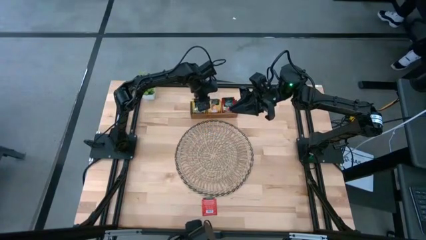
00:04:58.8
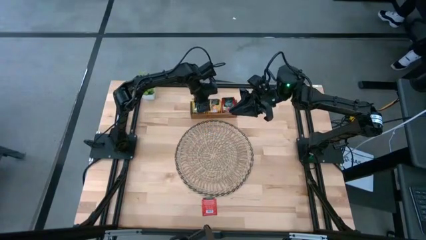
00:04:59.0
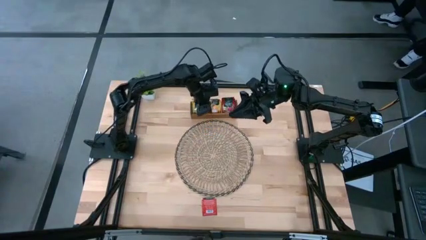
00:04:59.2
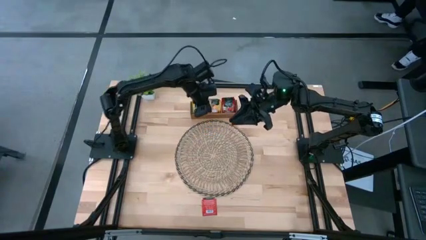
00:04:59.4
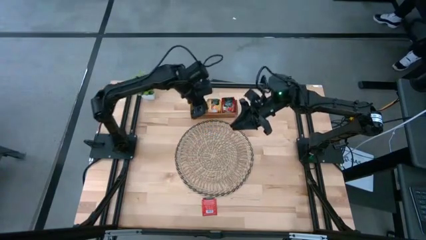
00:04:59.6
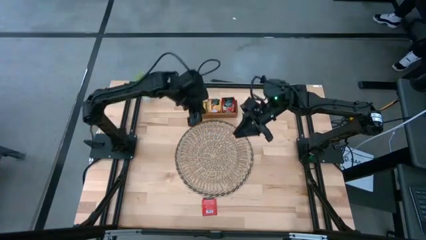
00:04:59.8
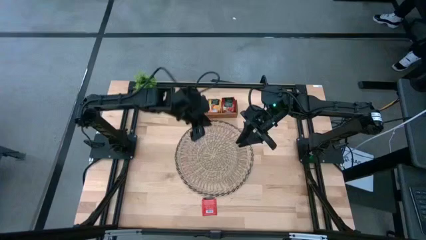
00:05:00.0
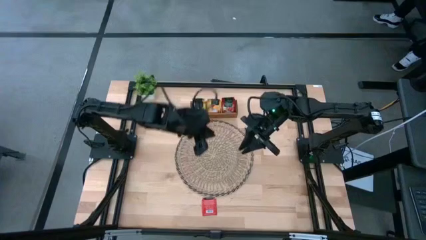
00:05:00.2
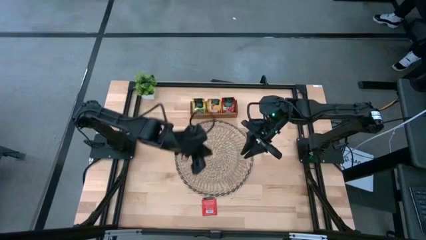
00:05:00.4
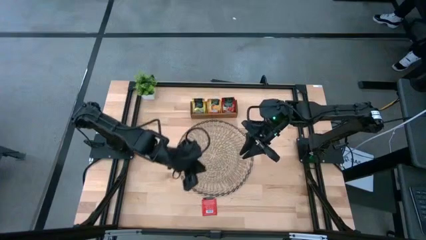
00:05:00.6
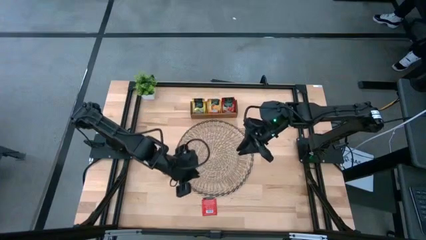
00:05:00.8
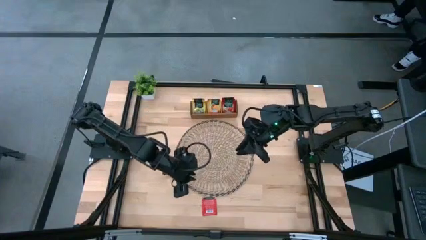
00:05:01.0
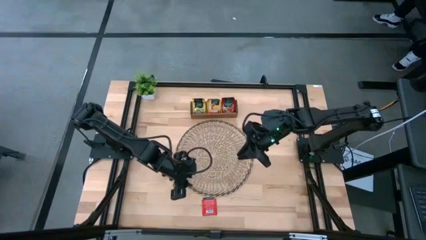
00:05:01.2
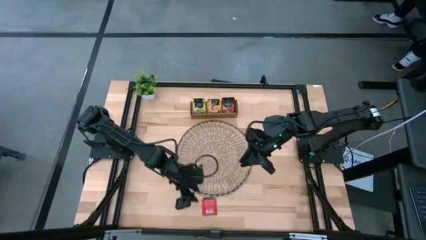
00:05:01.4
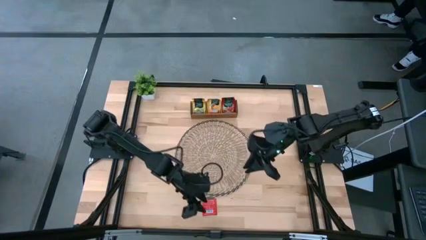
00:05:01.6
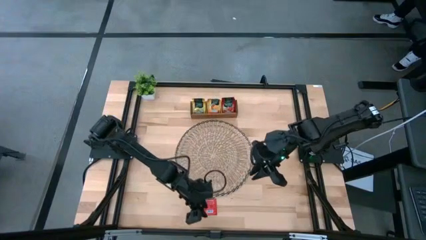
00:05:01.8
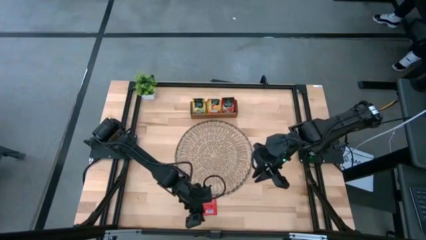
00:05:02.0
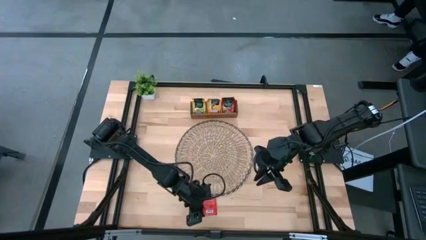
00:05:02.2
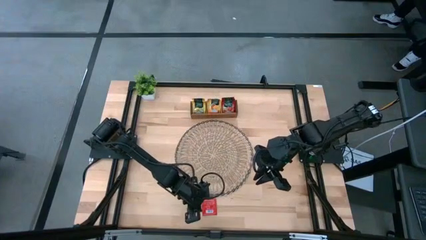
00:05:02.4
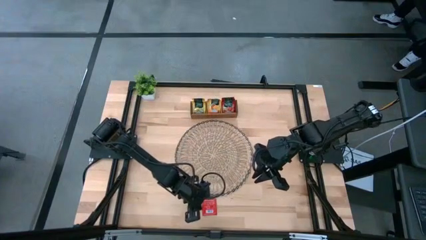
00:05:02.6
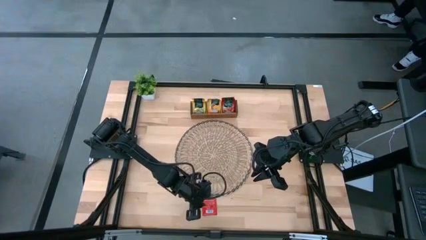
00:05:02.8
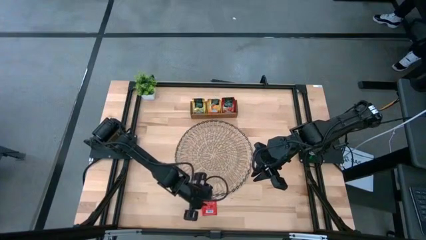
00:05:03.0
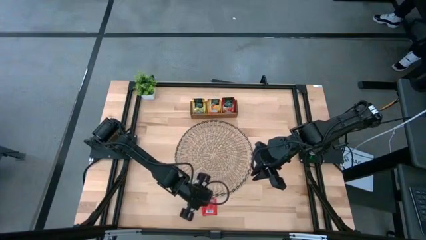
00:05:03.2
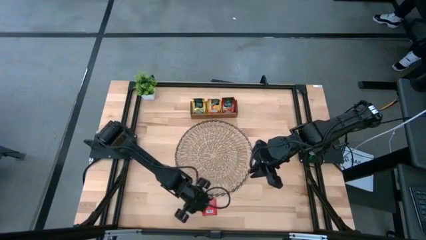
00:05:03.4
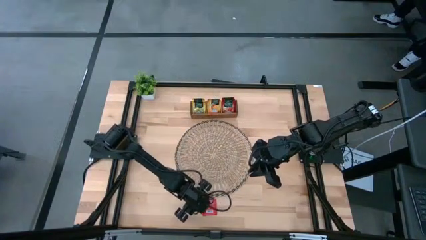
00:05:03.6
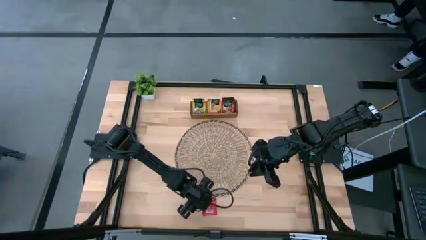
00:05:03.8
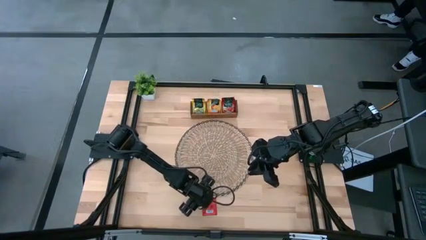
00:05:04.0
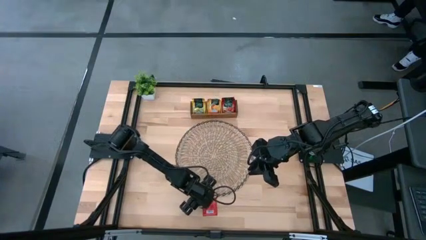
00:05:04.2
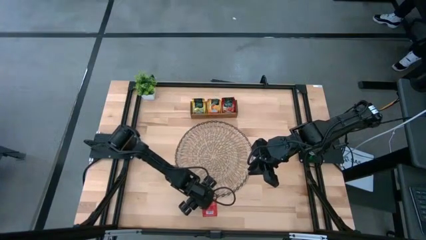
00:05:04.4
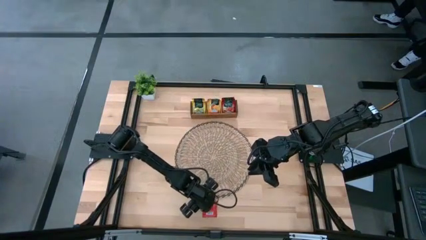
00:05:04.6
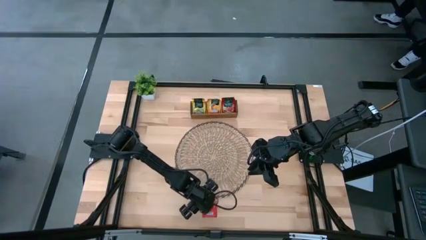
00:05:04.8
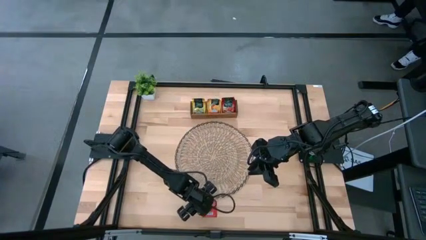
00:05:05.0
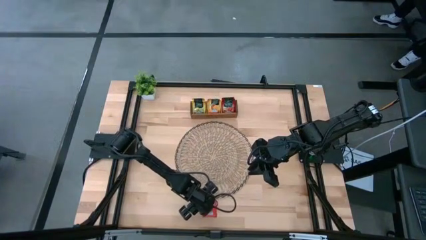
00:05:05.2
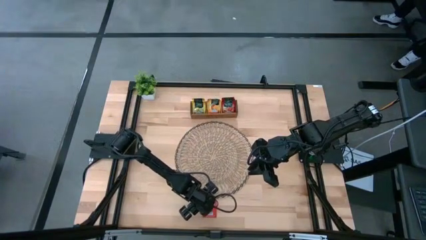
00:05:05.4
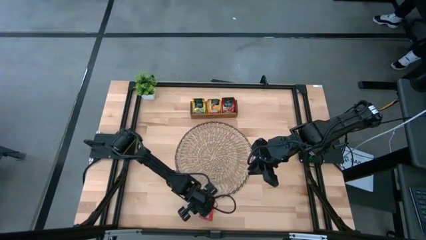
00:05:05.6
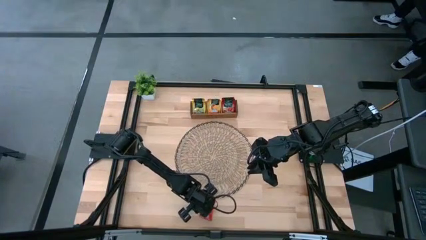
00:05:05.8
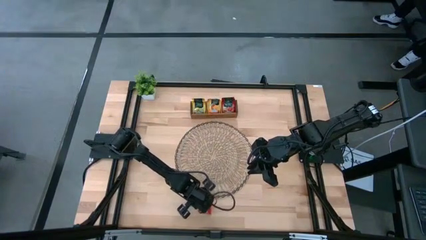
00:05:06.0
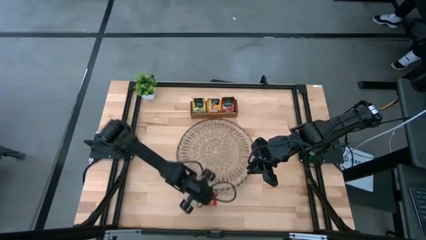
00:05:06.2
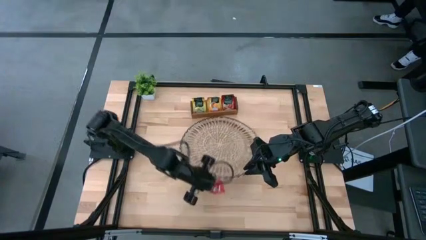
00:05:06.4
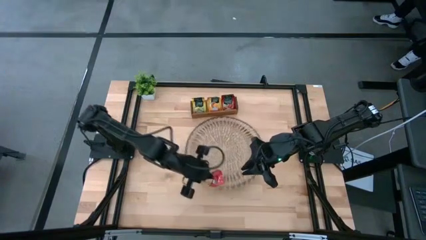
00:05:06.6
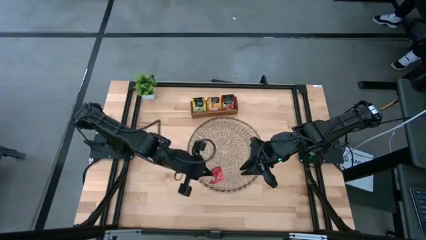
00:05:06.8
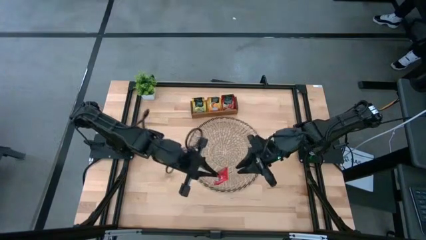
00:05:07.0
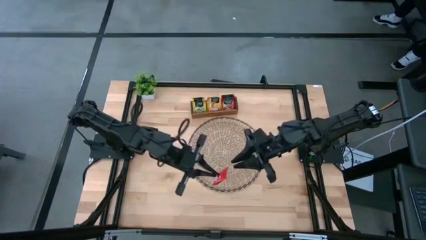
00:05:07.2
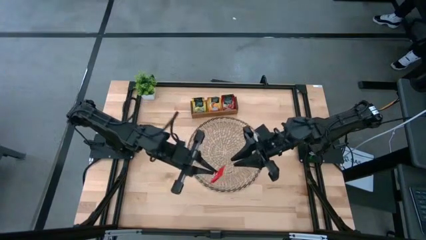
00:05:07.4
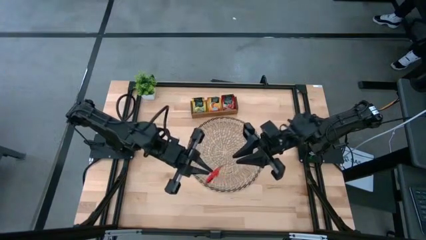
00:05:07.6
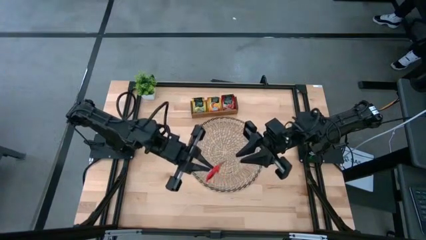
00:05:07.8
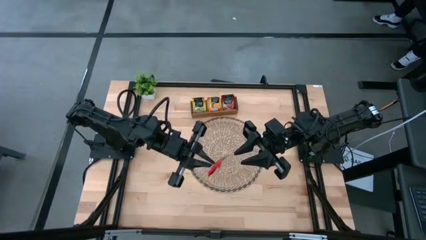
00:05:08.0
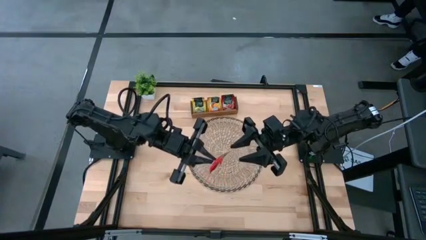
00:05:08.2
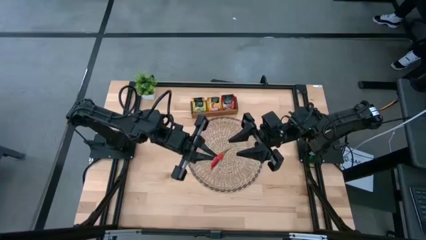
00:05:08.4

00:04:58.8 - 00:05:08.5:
Task: Pick & Place Tea
Put the red tea bag into the right of the wooden organizer

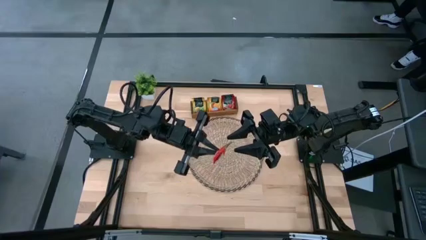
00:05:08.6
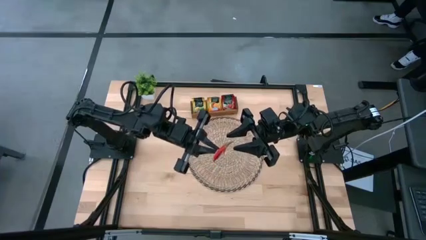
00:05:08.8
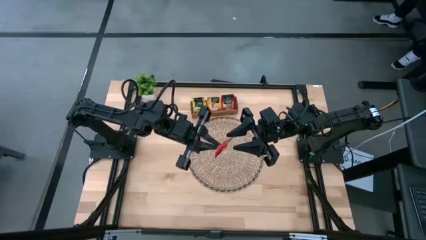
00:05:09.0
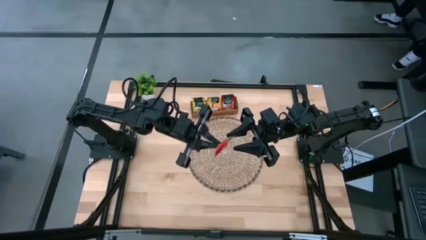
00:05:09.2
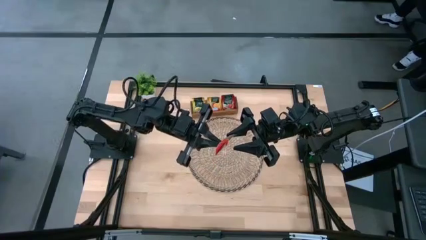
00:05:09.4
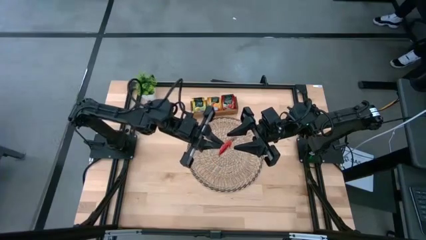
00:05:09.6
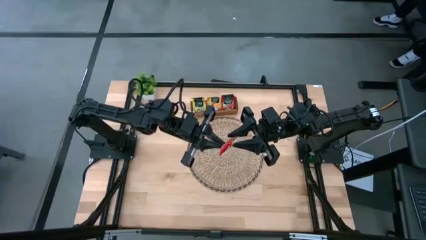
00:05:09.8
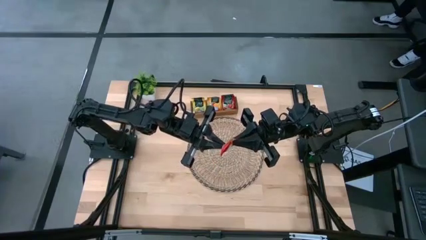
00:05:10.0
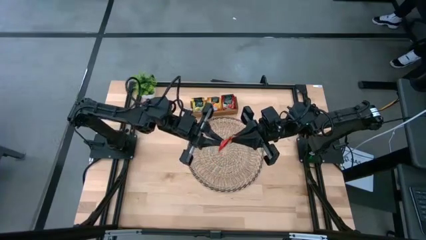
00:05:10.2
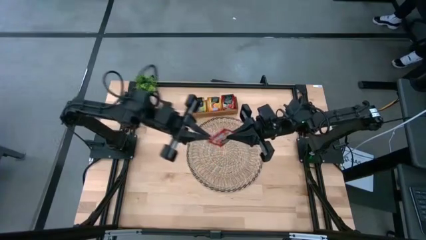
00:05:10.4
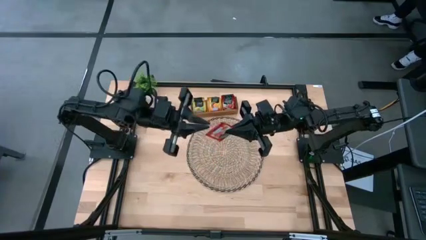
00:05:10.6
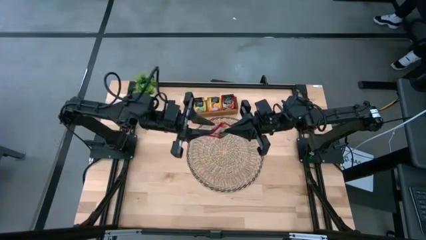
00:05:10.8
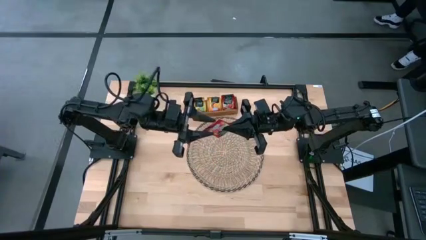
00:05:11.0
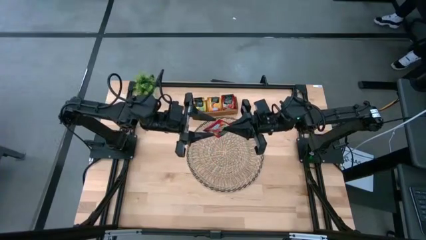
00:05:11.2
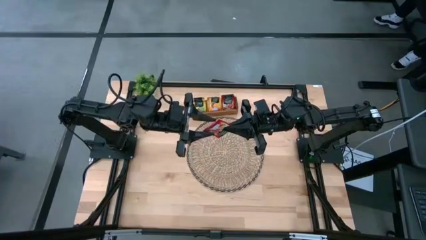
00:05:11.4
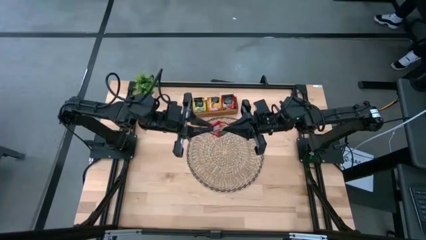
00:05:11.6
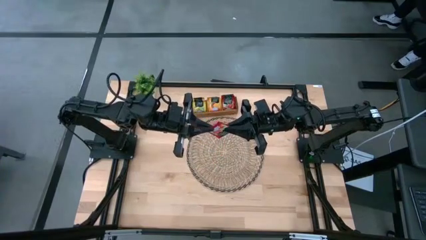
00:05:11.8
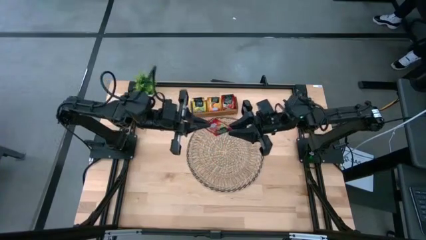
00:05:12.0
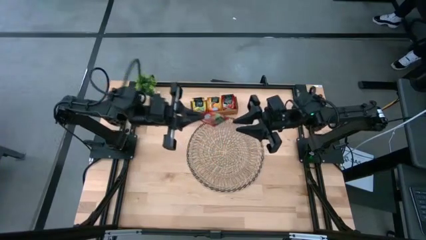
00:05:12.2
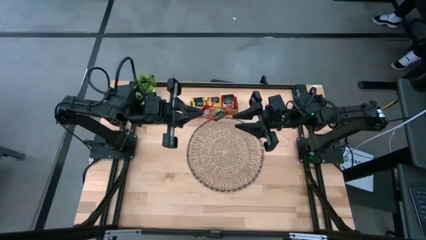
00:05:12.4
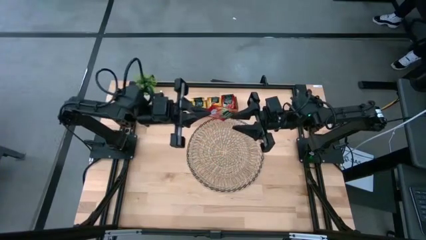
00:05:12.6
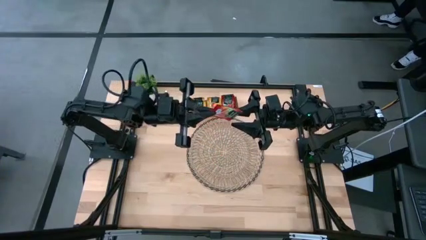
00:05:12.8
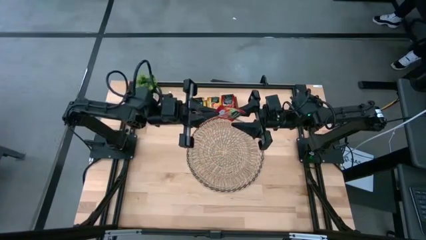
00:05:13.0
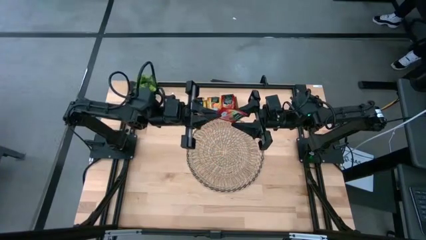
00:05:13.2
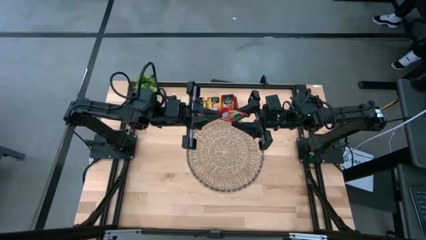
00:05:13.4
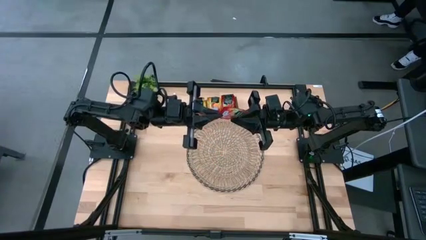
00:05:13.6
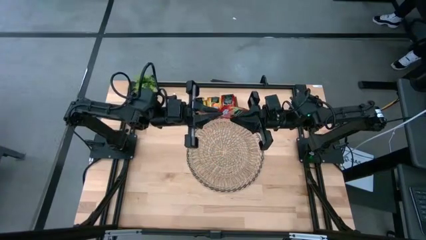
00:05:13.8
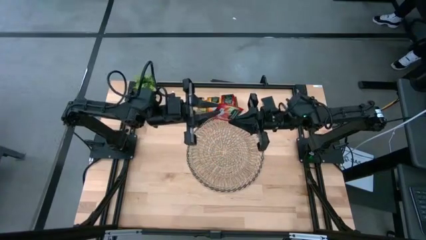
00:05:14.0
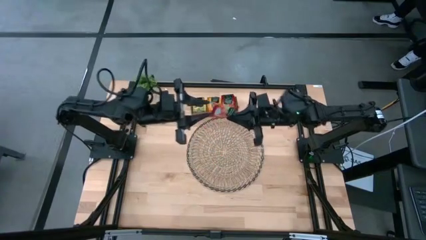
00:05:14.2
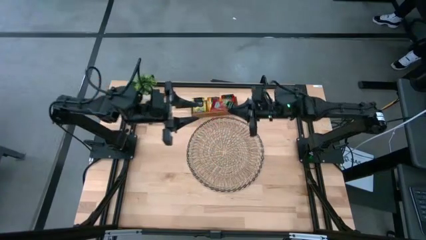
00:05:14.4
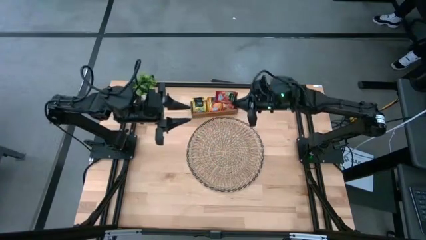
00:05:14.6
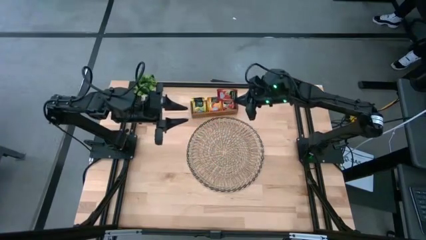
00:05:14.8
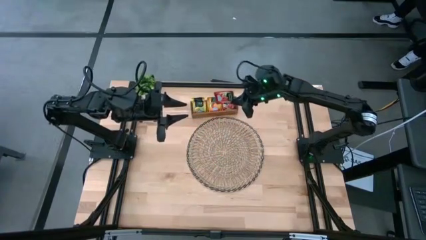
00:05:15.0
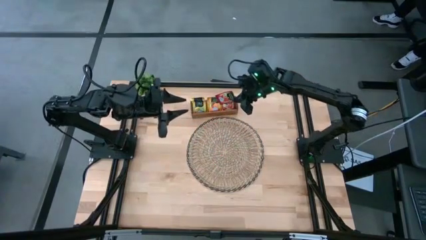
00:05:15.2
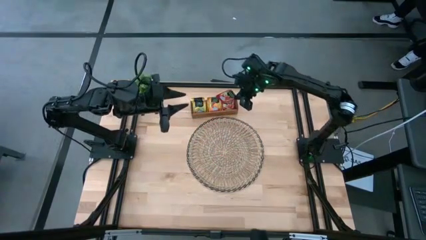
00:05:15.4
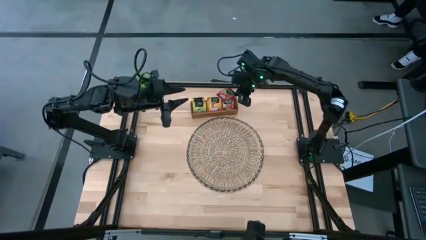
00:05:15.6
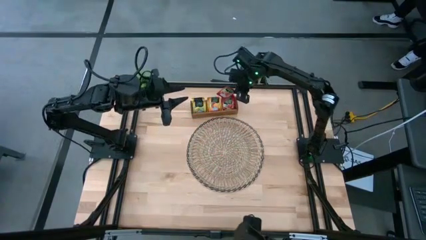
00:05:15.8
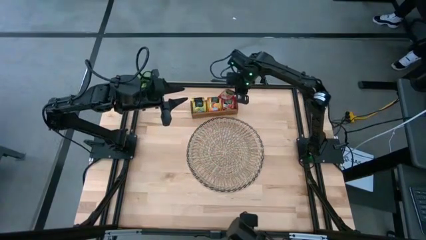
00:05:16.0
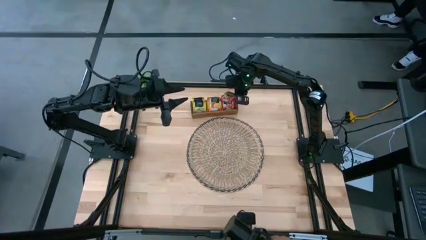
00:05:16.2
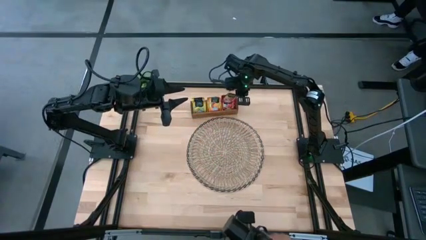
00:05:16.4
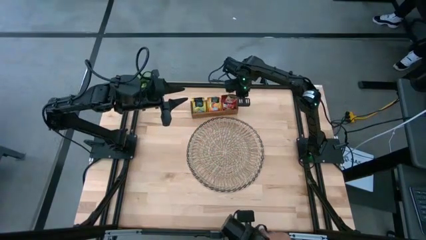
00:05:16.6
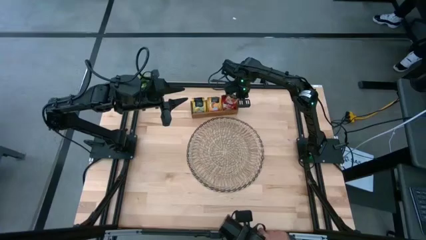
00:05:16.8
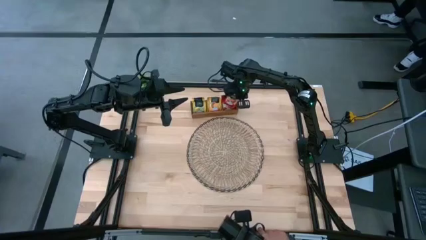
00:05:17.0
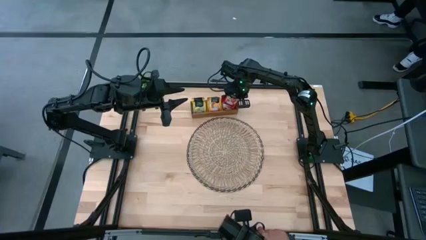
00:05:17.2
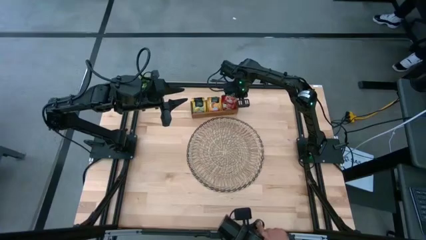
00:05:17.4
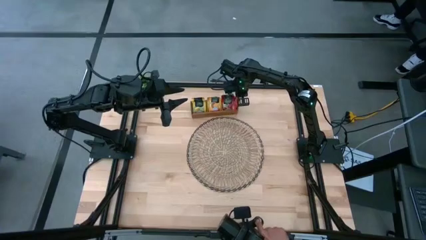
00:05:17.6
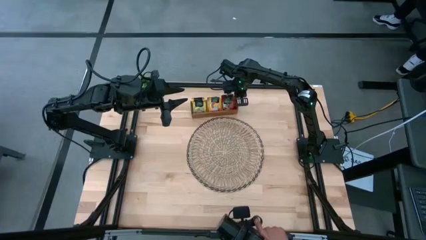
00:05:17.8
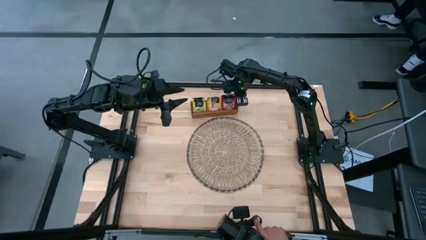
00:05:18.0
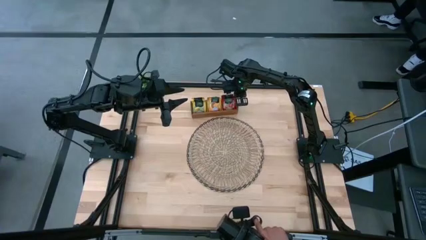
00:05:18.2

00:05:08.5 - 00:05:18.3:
Put the red tea bag into the right of the wooden organizer
